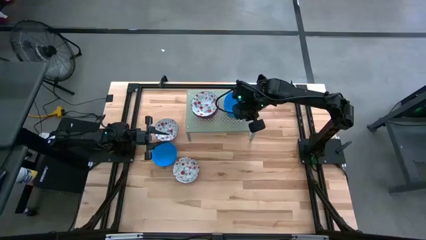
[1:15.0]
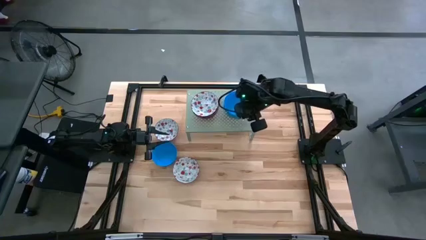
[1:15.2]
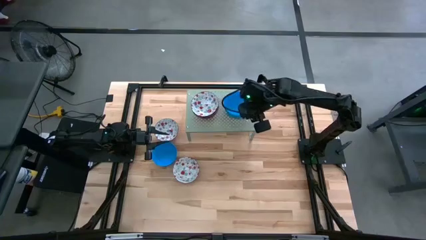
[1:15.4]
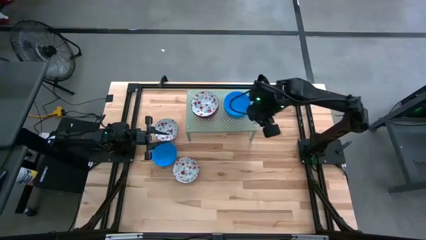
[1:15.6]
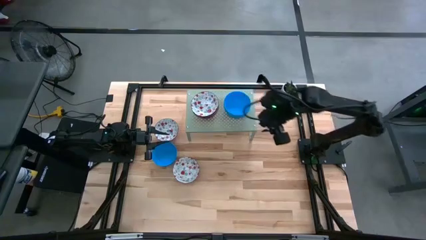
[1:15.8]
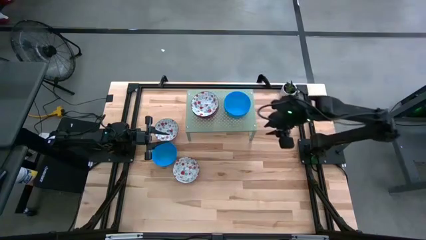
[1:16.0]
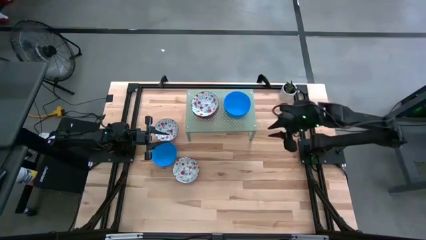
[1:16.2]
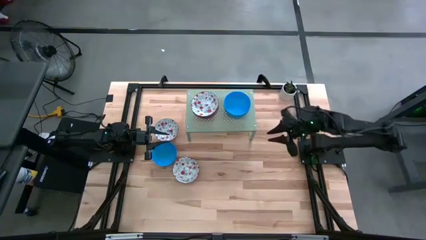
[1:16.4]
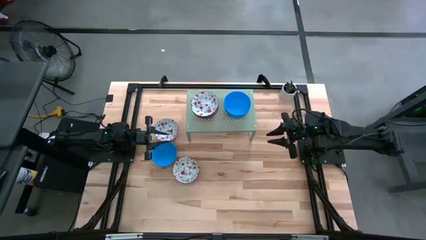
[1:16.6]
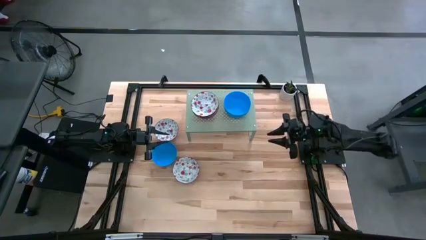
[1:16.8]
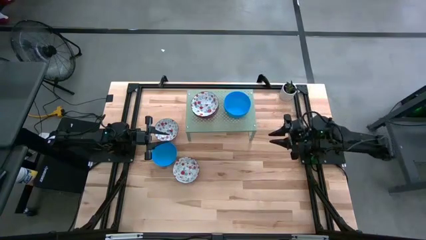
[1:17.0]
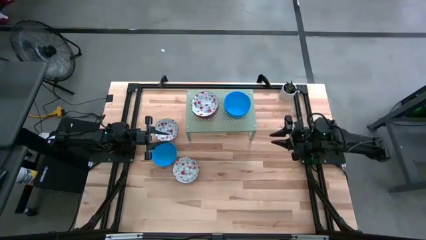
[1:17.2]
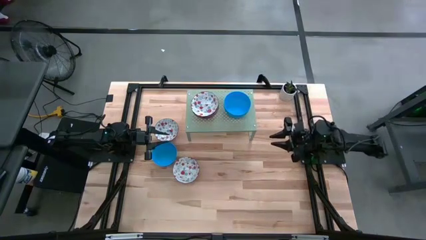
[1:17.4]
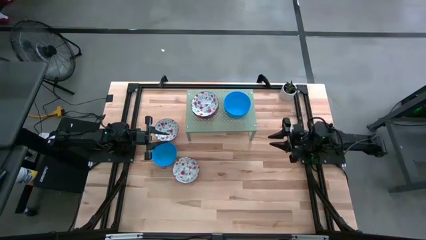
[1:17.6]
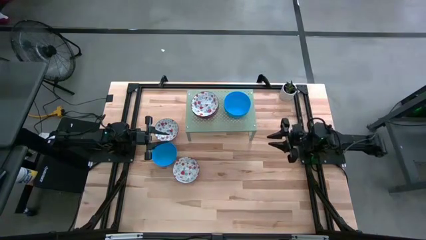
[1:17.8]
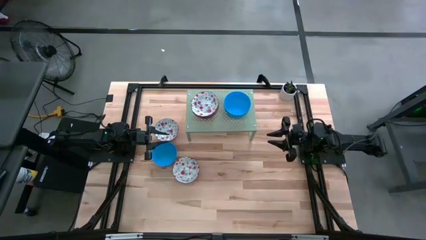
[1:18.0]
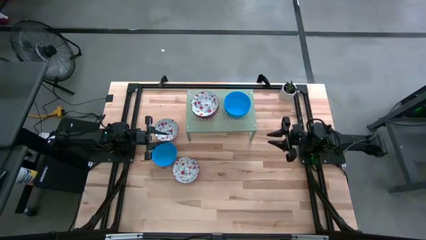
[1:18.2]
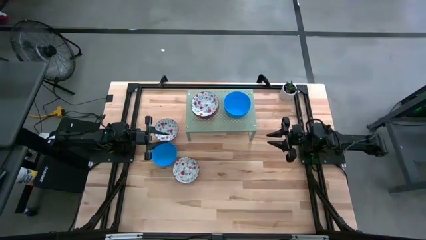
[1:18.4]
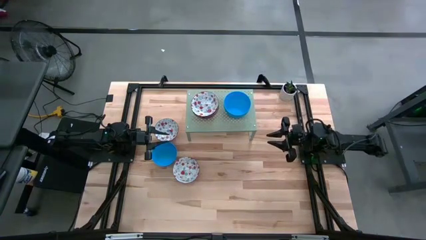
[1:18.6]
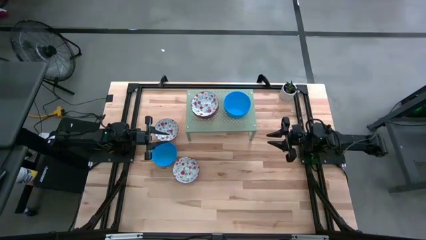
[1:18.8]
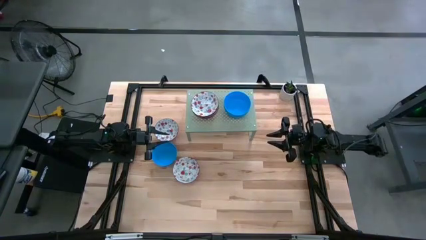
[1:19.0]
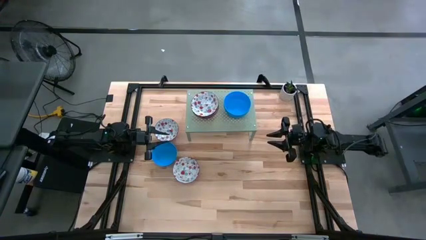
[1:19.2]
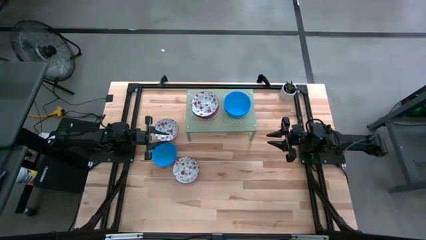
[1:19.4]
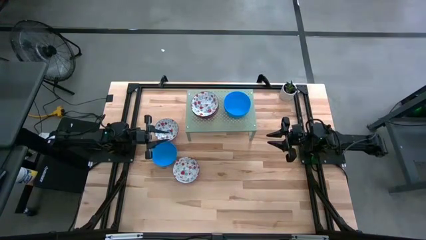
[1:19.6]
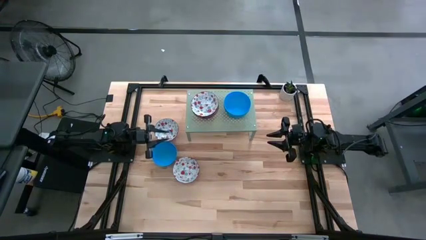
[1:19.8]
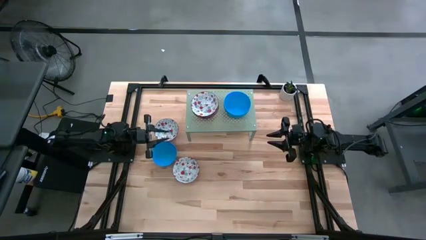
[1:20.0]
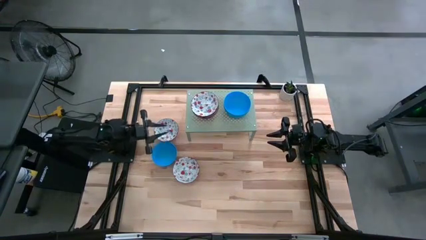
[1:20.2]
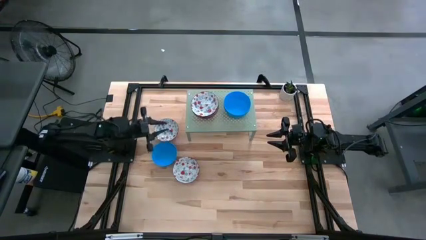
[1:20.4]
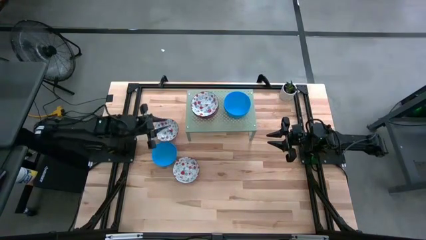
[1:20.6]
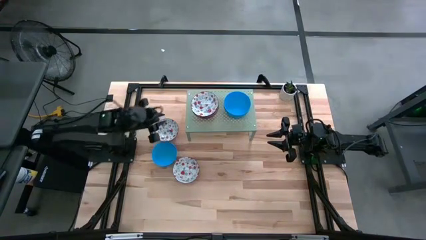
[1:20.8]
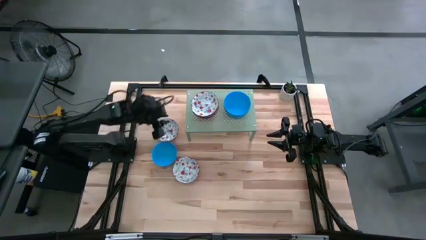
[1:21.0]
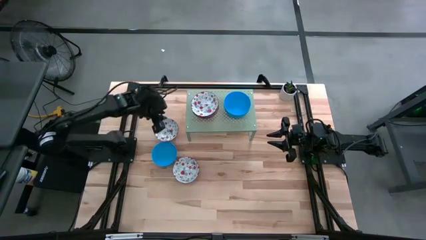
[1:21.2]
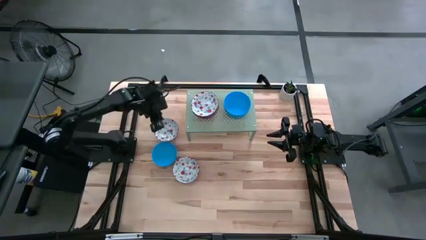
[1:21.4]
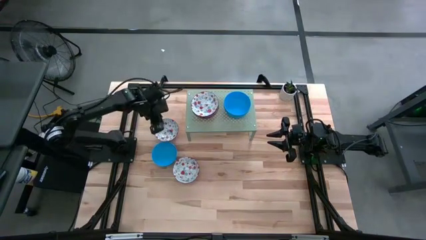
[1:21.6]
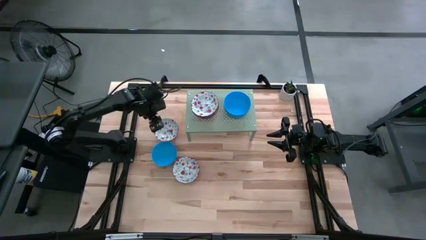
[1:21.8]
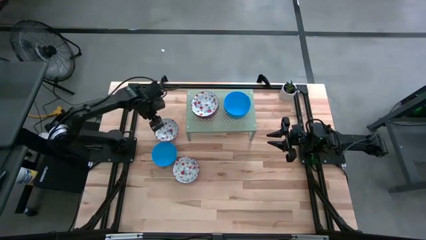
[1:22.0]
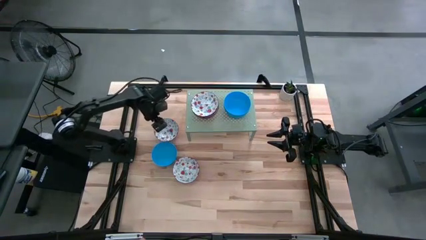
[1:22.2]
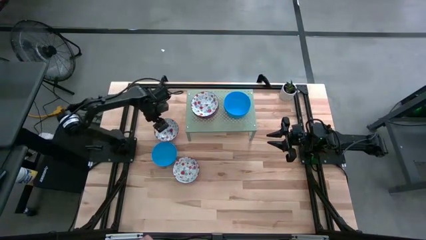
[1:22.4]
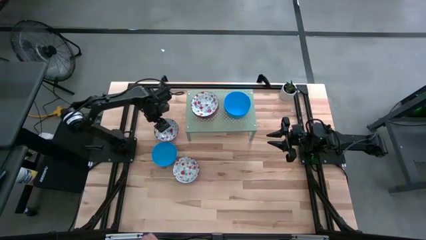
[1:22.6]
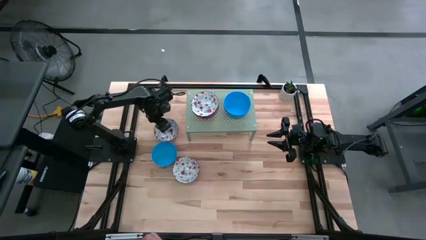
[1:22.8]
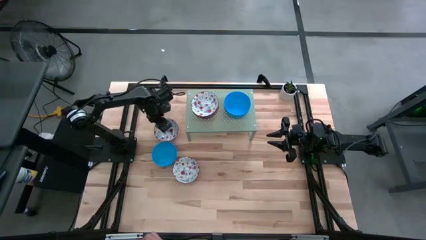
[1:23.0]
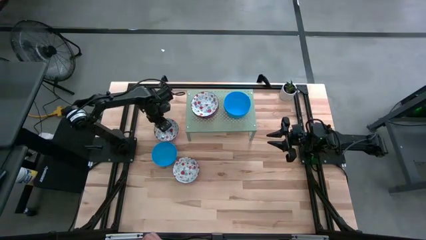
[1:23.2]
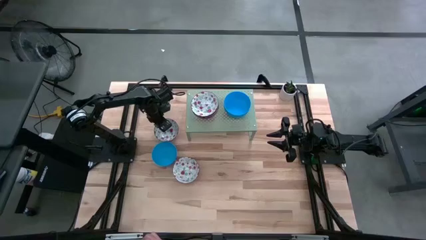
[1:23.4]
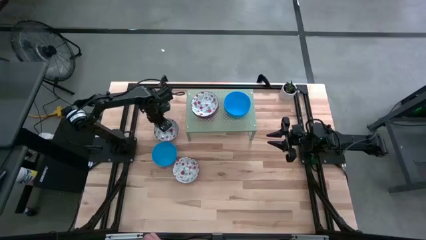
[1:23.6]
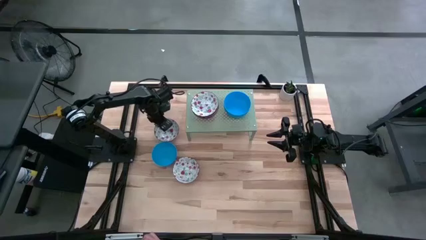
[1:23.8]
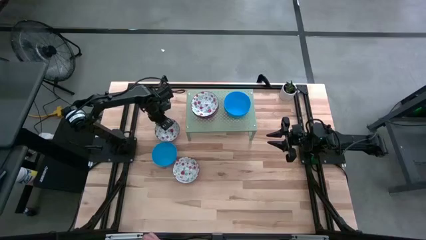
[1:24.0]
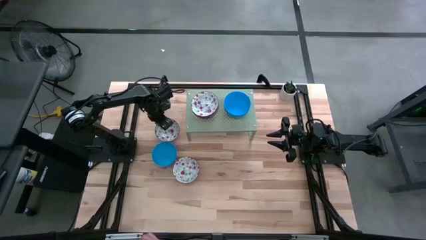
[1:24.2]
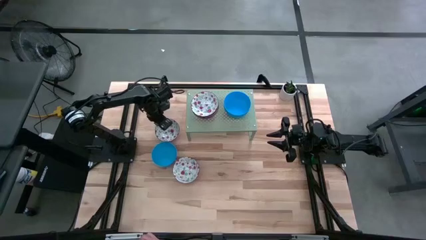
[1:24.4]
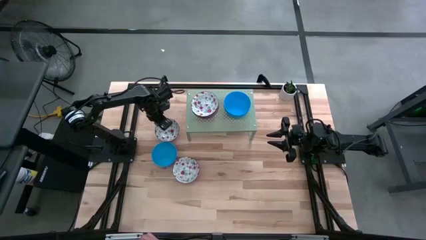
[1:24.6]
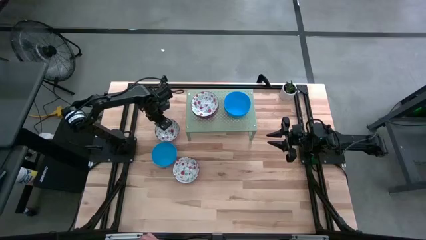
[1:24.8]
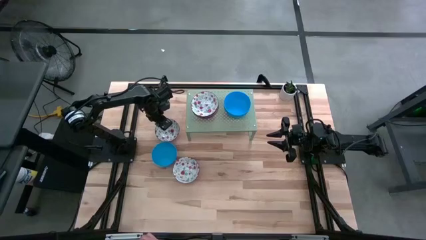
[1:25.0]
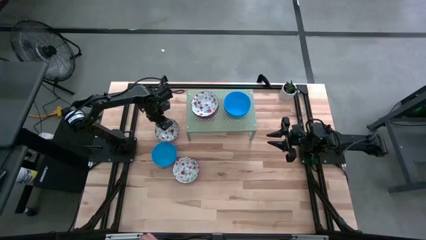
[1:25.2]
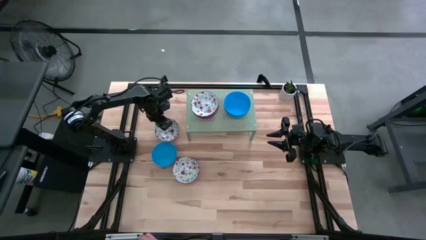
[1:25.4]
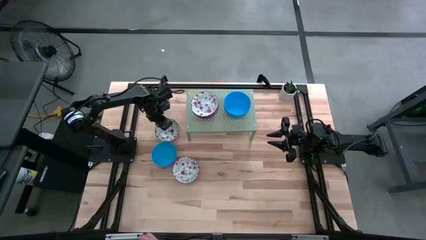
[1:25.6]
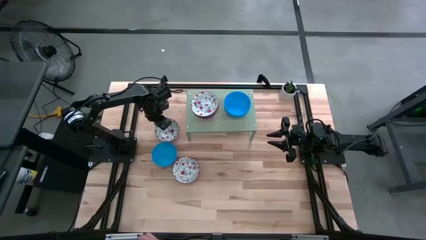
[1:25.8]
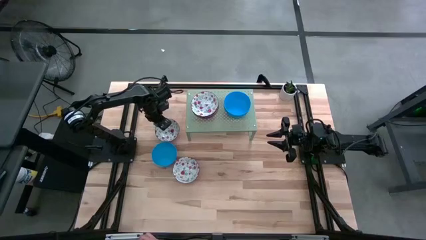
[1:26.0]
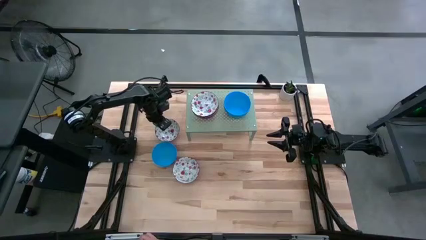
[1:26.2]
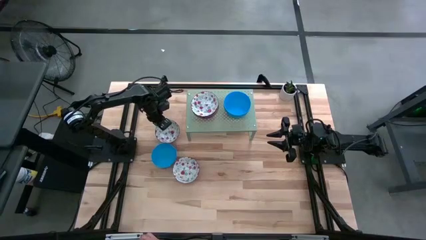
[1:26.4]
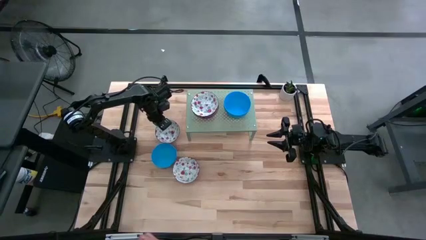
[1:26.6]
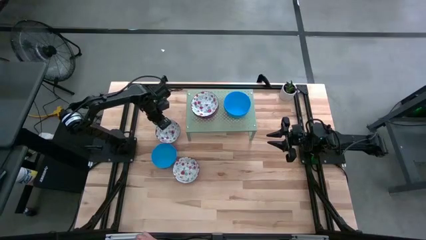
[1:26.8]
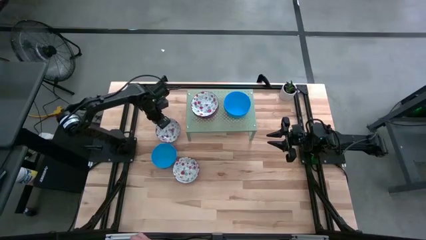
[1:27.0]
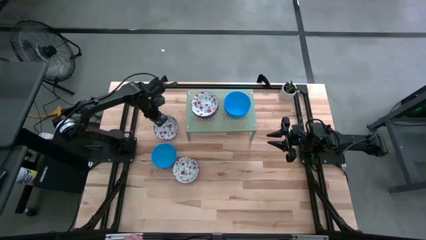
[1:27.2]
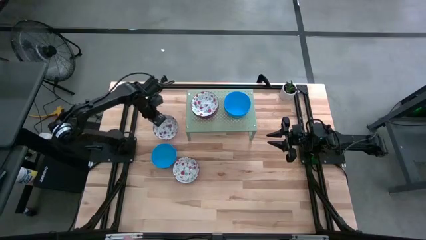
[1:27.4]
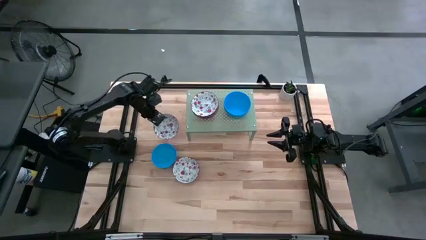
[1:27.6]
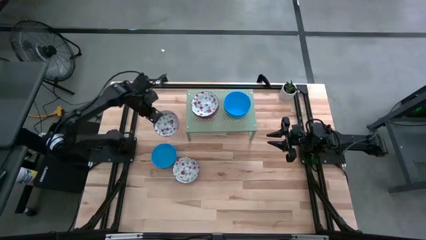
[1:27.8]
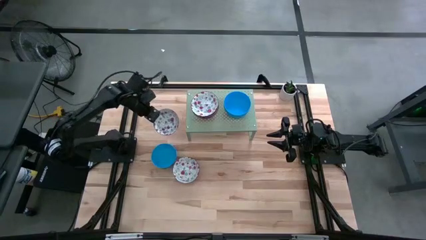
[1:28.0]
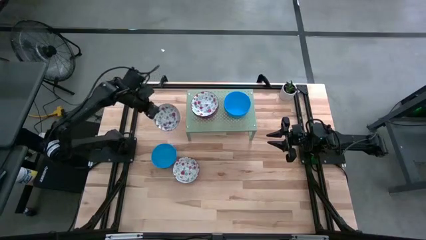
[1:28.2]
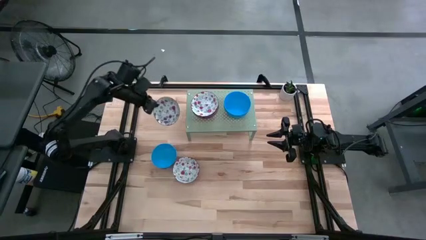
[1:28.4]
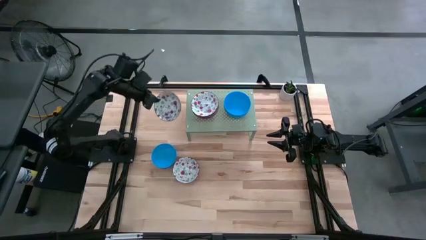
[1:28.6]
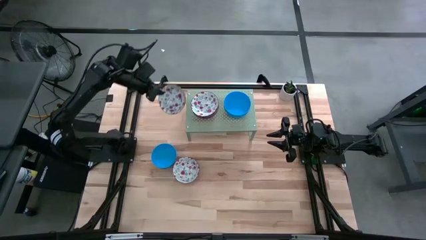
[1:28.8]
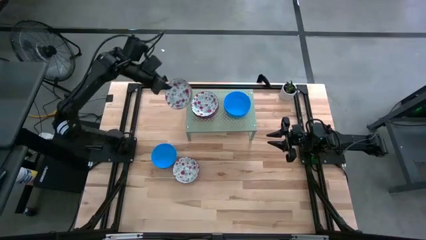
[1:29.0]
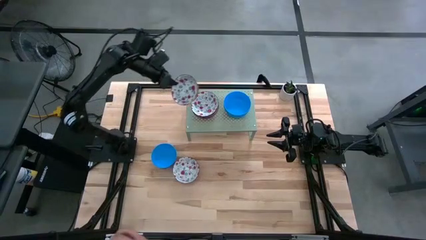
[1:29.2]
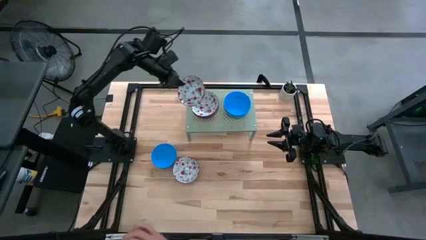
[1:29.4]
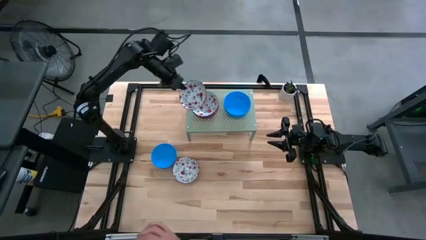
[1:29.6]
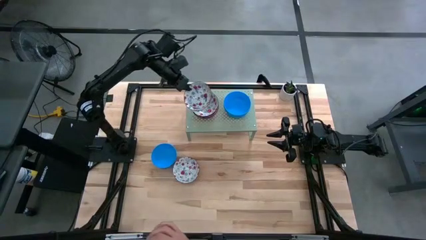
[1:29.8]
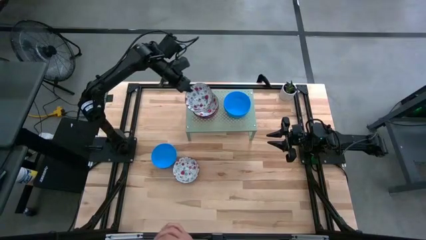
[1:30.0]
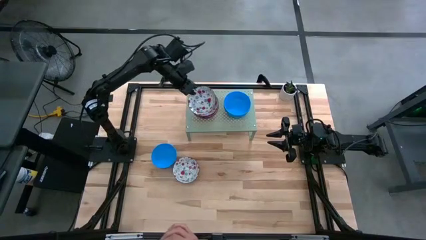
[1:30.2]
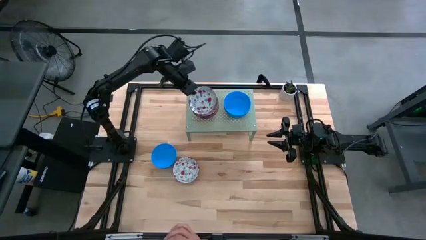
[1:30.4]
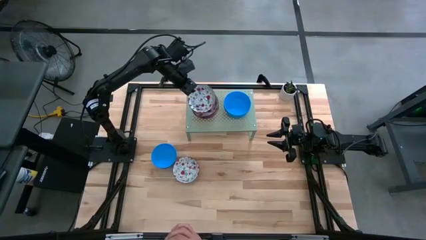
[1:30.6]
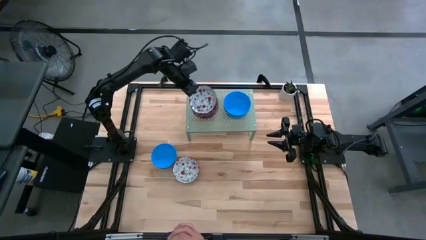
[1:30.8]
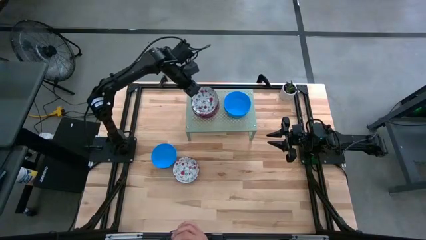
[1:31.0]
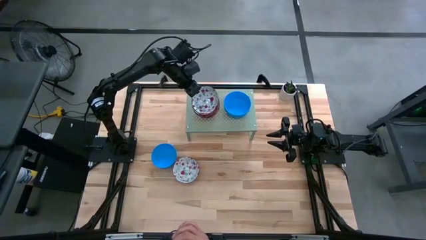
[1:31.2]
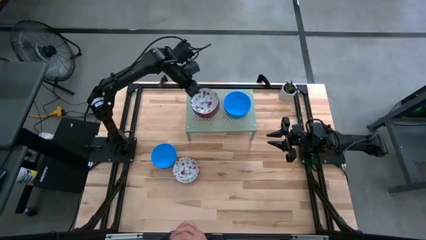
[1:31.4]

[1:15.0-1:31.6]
Task: Pick & Place Mini bowls
Stack the red patterned bowl on the stacked red patterned bowl on the shelf
